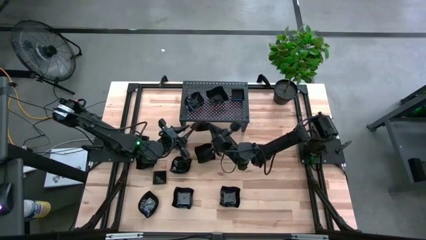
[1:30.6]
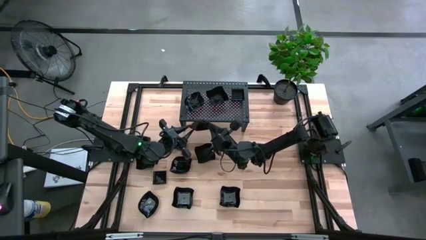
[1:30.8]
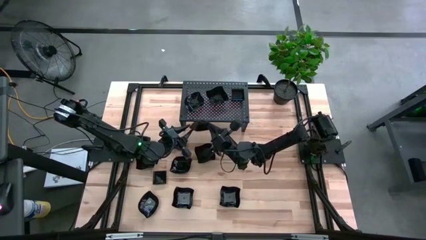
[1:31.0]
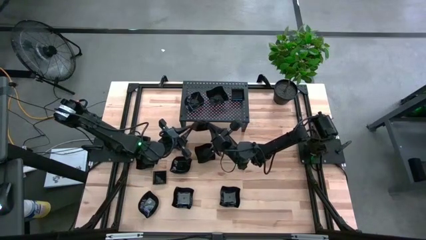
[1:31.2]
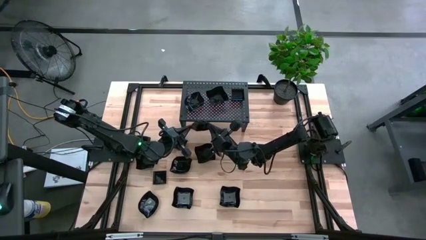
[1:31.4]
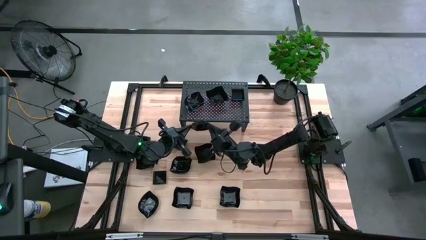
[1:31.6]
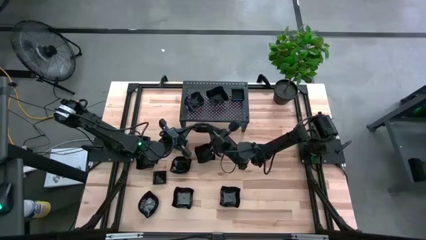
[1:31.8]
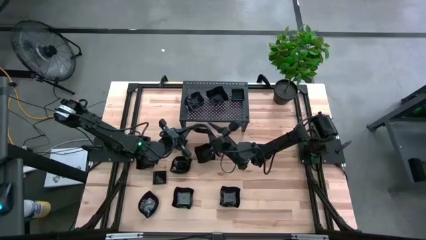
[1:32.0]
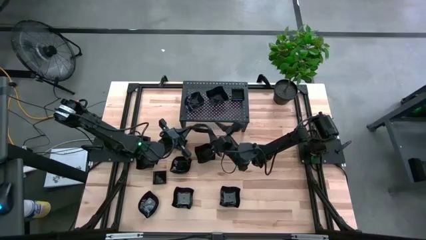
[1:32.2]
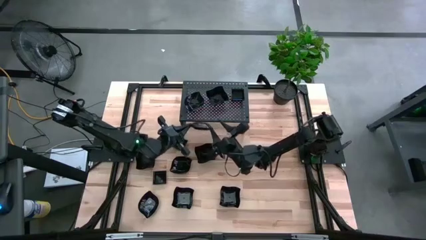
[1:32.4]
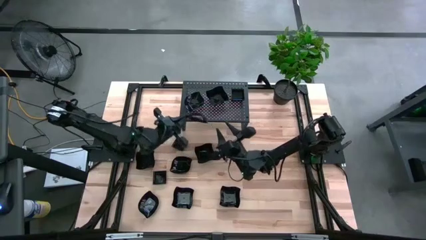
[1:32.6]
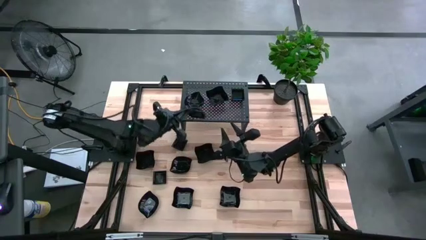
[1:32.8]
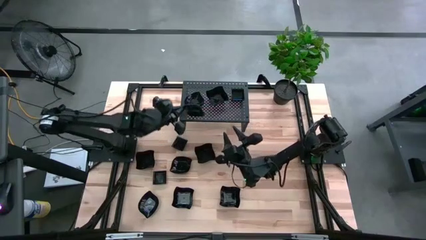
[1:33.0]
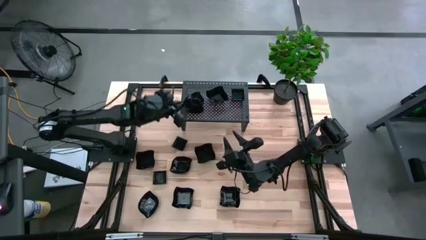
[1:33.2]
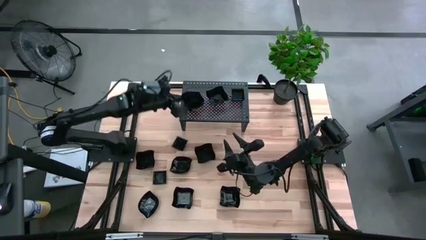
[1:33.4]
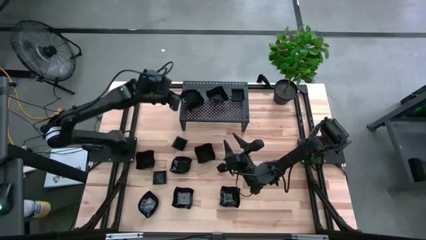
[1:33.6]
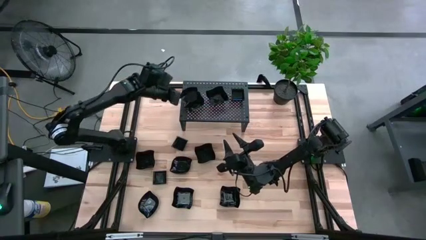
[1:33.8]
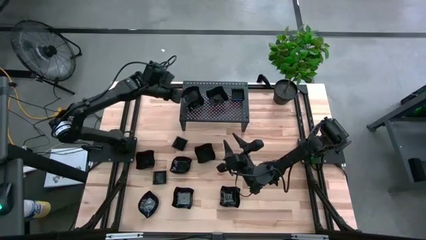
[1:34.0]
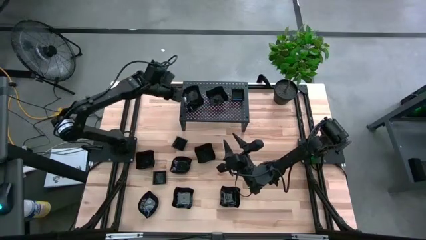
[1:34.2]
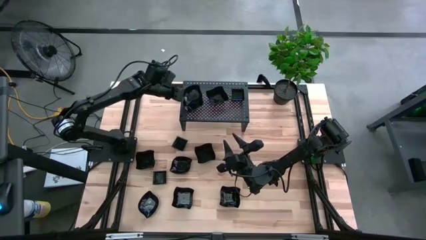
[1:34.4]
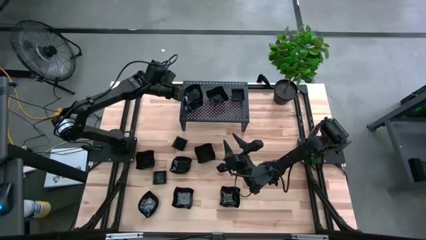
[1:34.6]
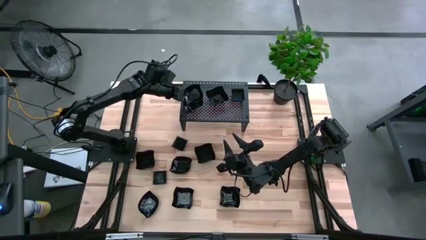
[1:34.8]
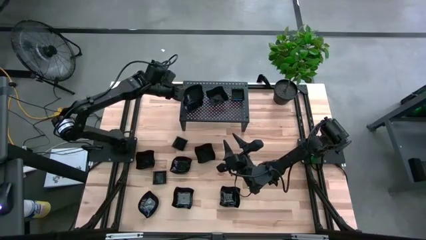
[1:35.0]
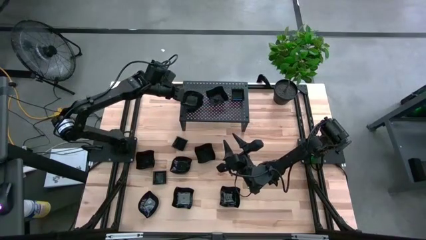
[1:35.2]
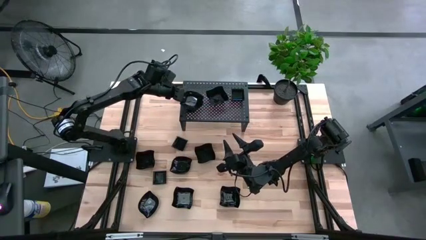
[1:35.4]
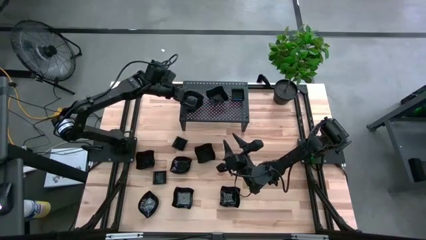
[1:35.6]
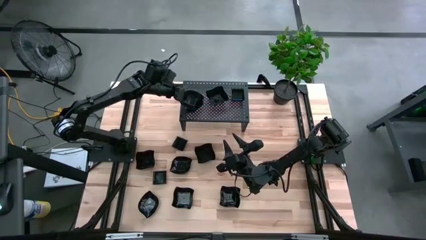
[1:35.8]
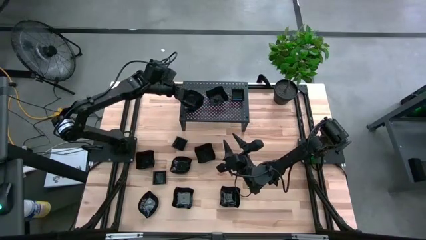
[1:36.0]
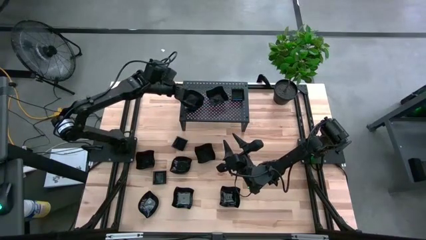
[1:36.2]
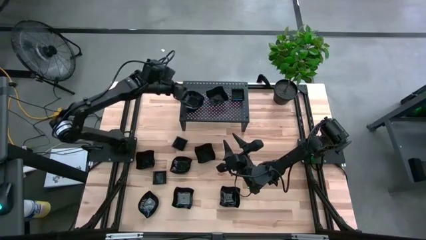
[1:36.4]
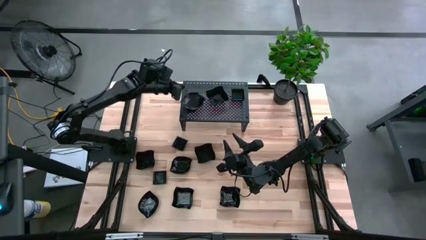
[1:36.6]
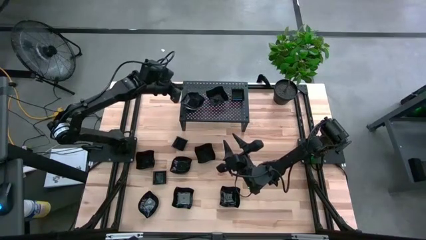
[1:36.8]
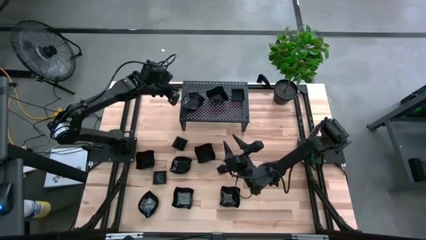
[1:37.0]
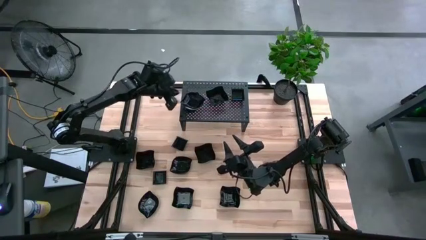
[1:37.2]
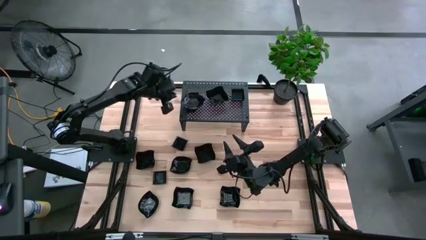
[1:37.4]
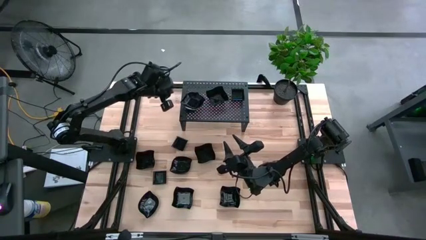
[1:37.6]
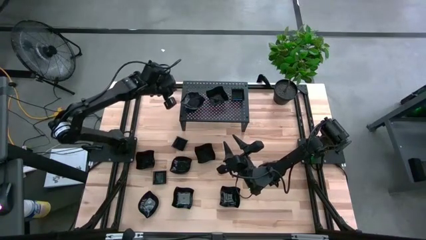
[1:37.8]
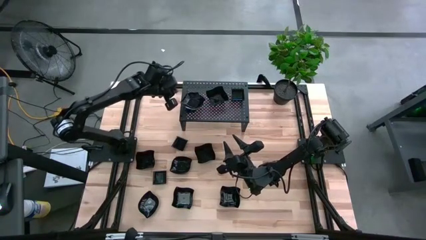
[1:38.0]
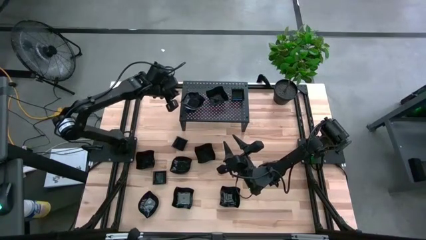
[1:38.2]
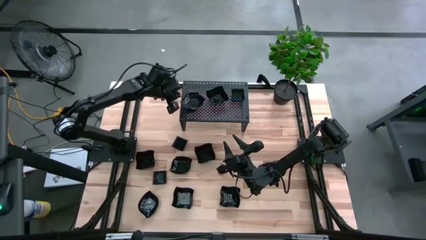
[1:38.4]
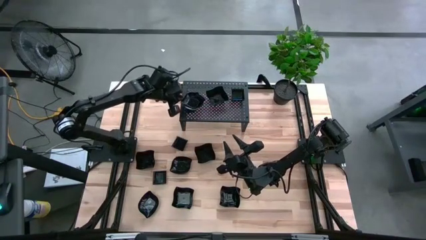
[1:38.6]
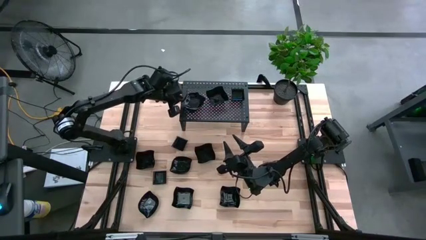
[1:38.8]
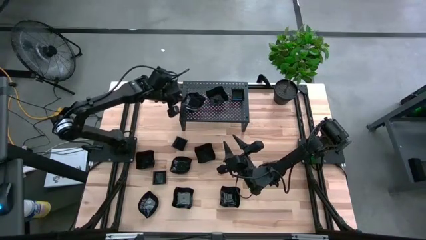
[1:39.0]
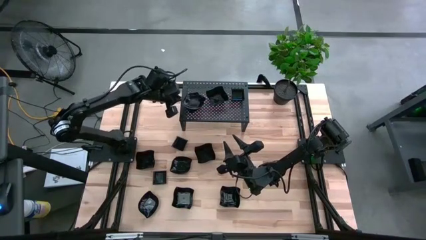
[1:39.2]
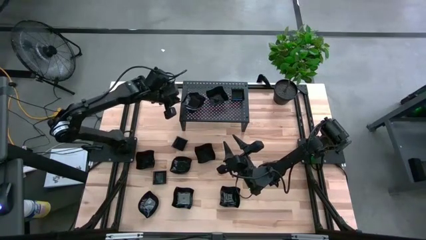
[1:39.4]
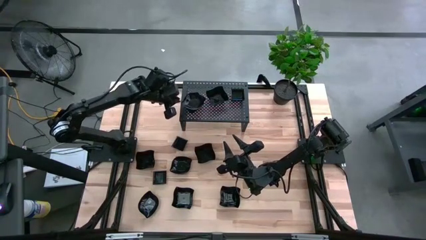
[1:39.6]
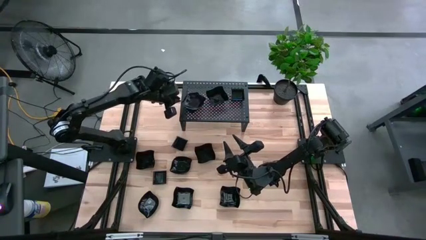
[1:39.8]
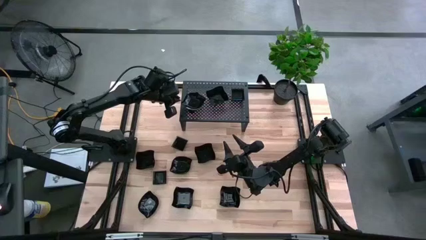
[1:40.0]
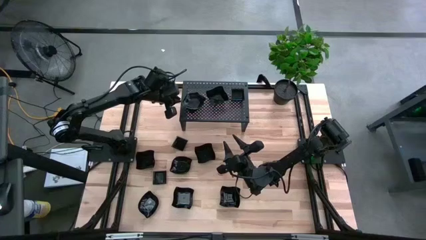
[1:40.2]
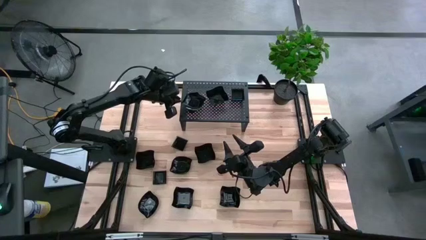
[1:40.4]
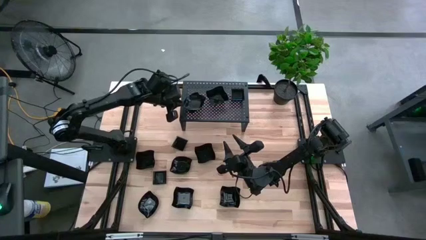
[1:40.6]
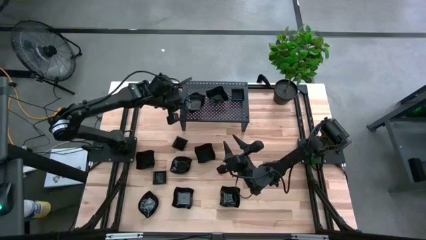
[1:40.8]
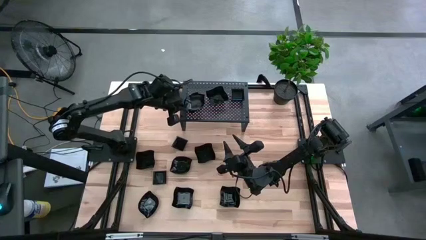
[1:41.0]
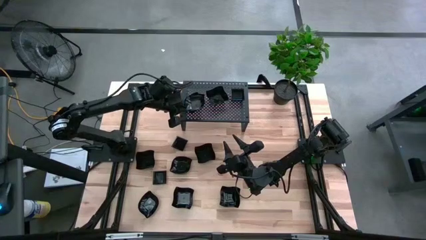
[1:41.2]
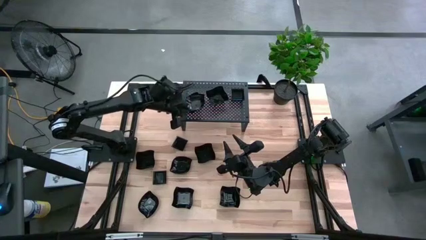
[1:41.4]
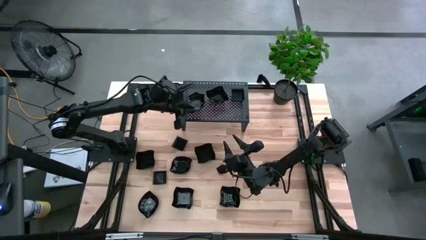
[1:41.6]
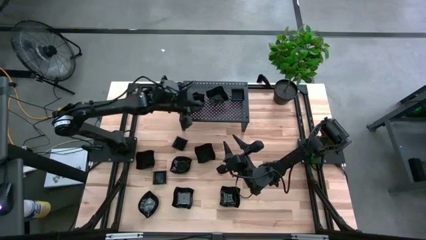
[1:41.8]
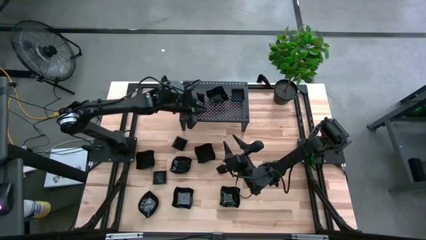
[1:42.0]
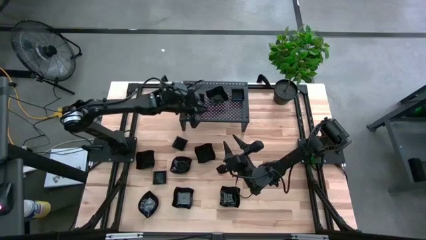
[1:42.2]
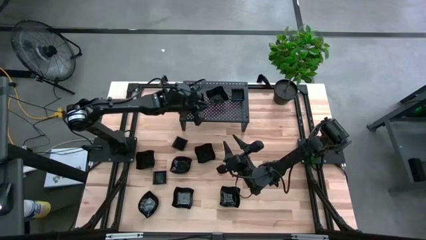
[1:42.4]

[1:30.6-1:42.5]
Task: Pick & Place Mini shaped plates
Stack the leaf shaped plate on top of the leaf shaped plate on the shelf
